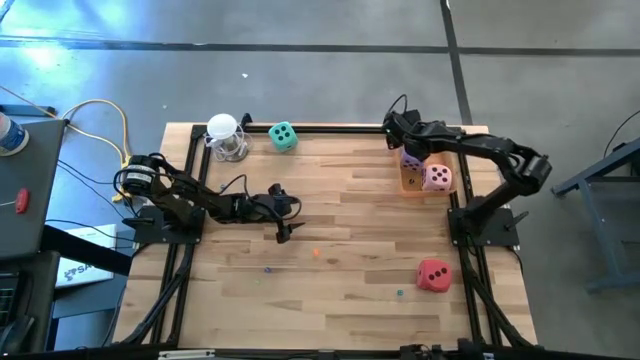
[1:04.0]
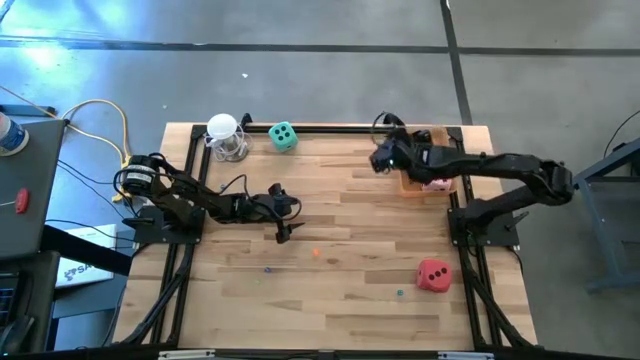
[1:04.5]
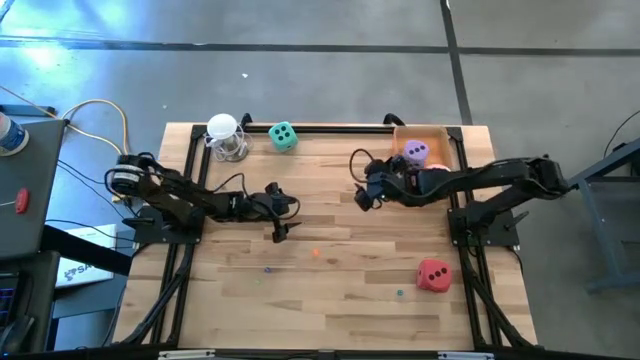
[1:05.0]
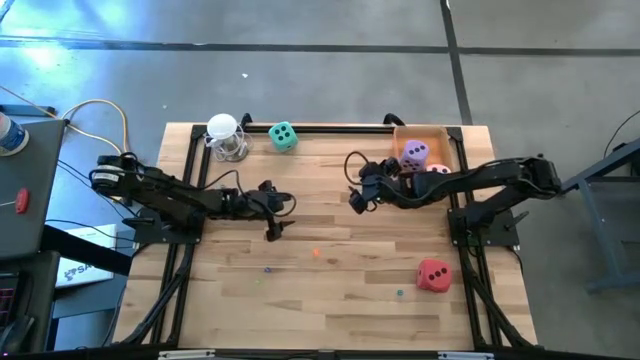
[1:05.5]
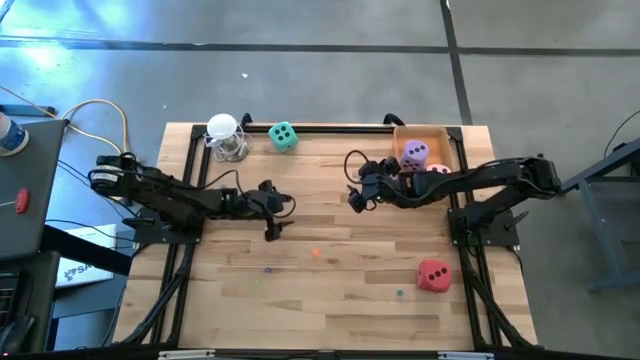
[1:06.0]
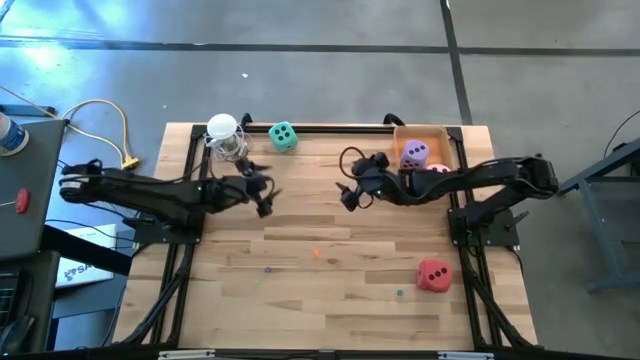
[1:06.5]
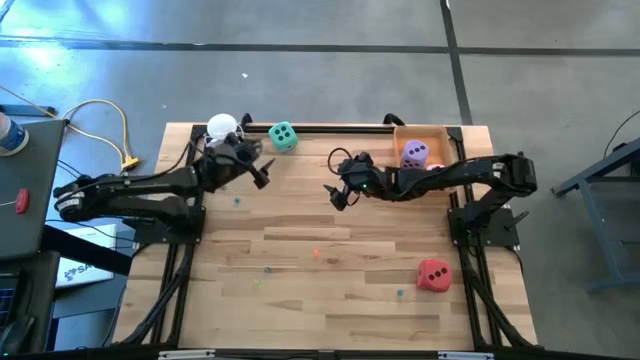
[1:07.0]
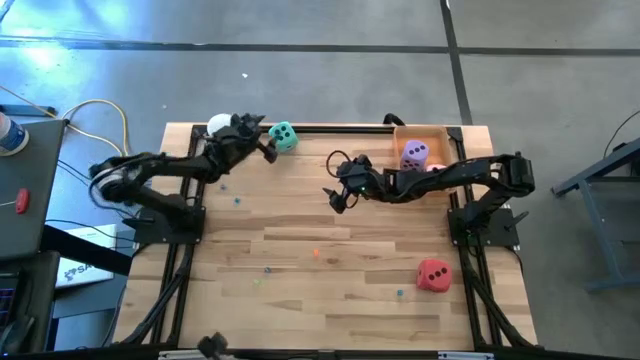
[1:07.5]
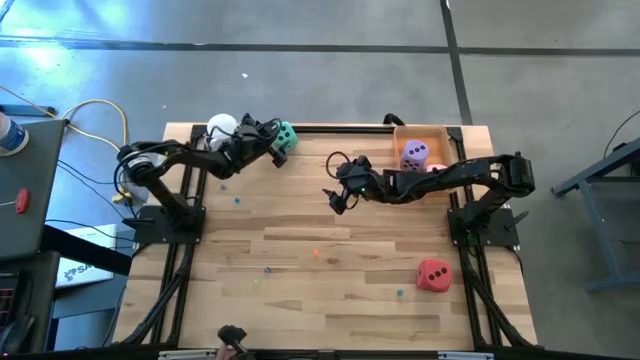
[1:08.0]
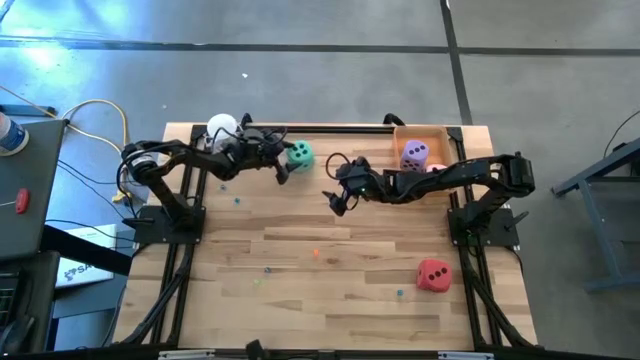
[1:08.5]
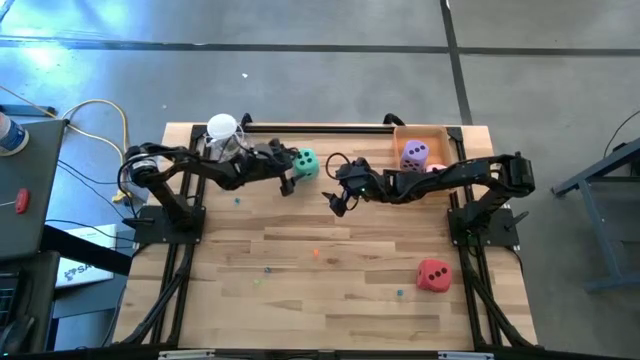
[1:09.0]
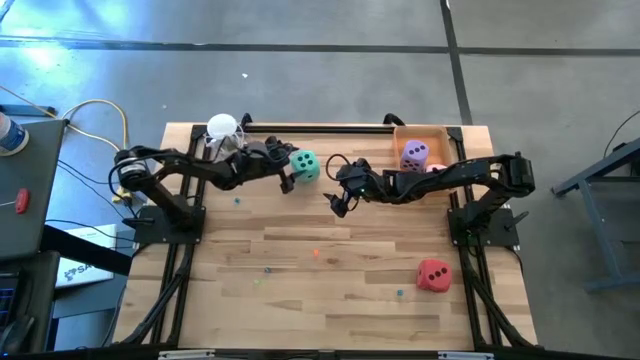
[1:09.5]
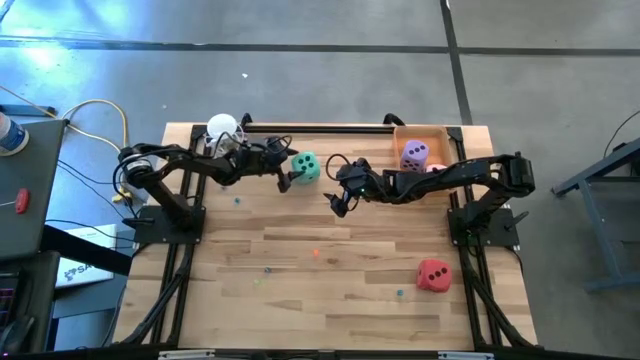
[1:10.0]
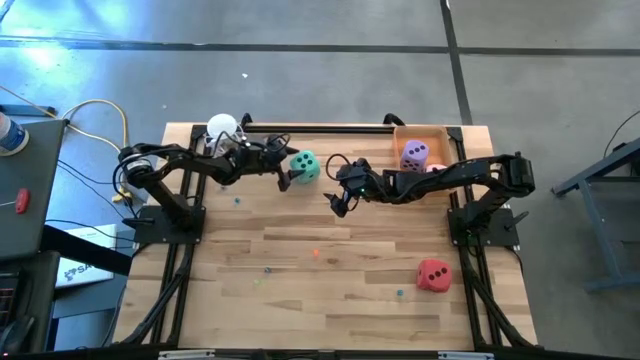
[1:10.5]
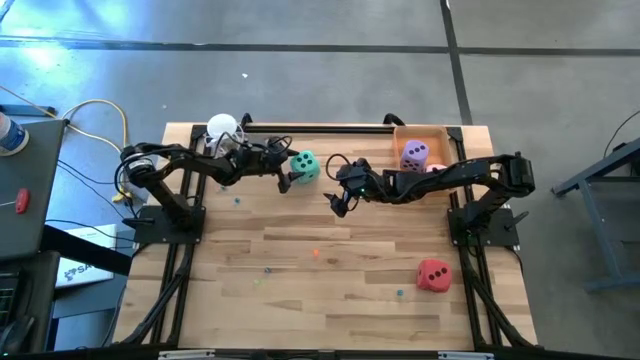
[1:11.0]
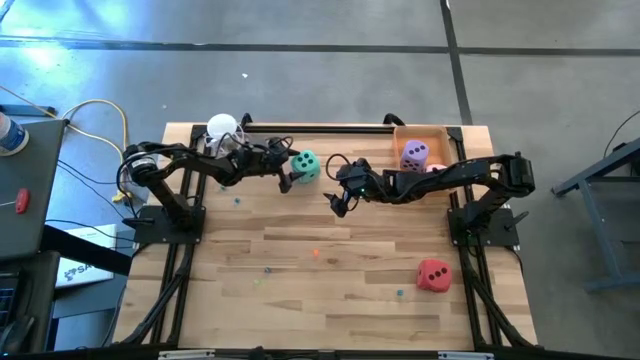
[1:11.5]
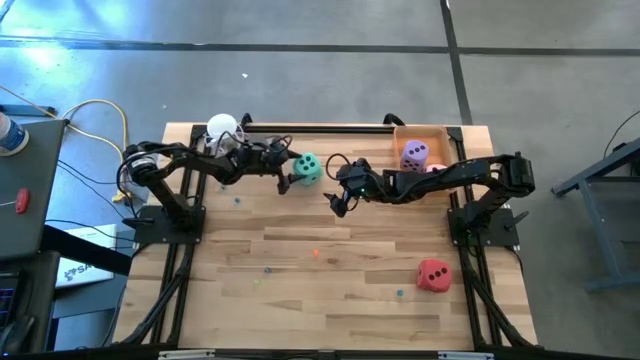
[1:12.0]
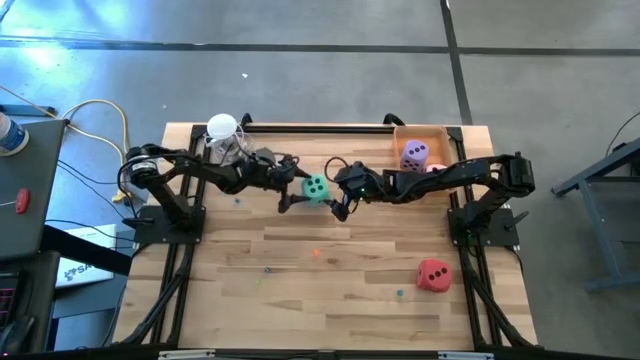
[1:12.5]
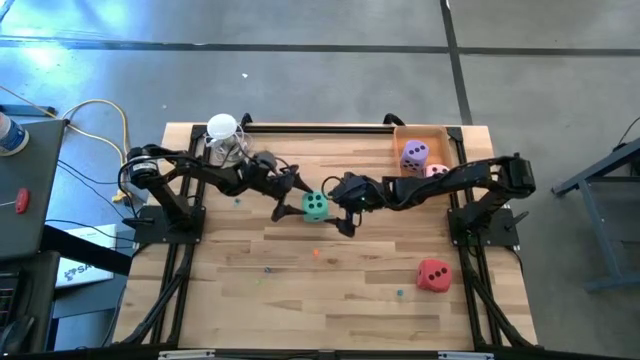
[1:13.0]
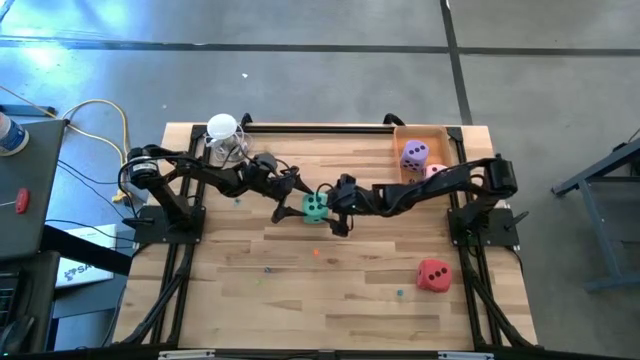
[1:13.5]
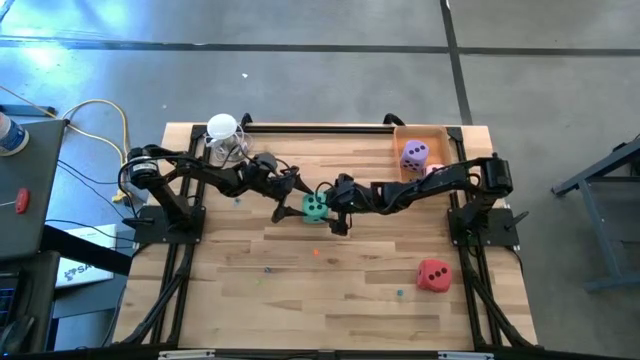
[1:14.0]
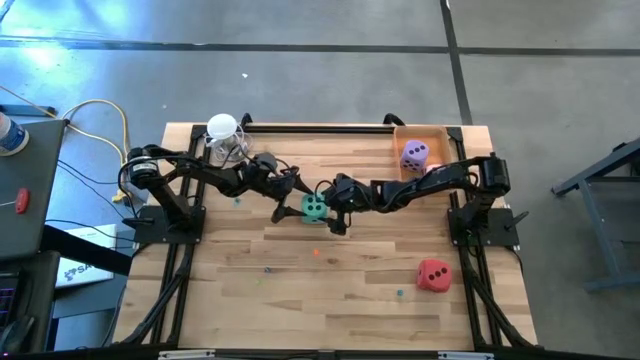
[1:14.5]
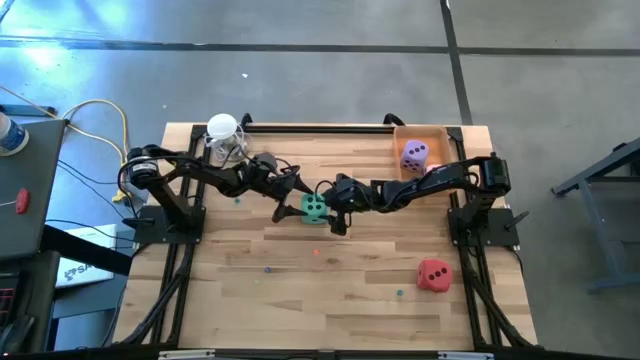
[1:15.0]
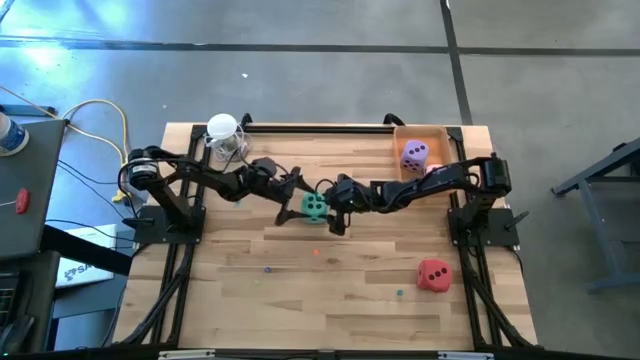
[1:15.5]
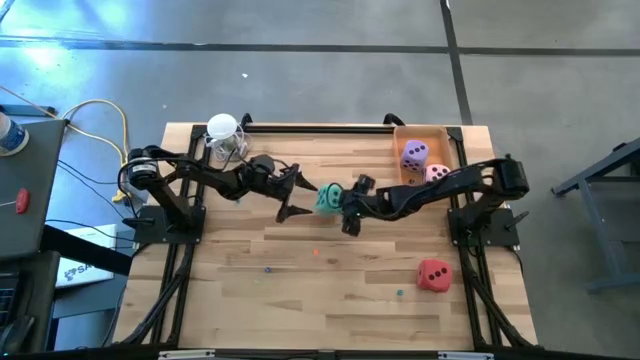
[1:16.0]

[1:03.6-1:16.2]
Task: Pick & Place Dice
Put the green large die into the orange bin

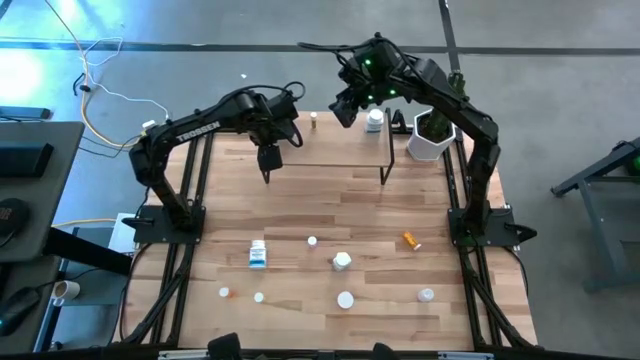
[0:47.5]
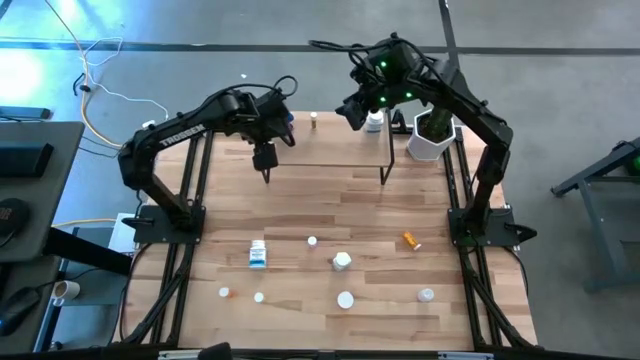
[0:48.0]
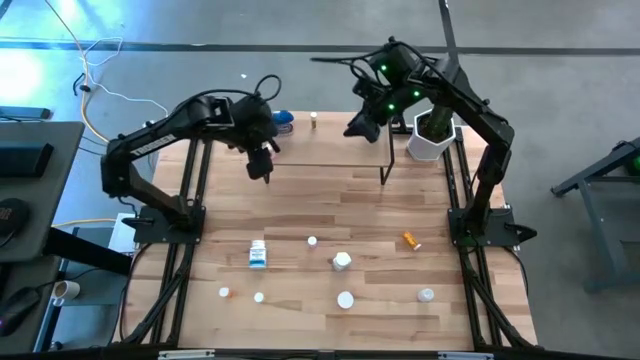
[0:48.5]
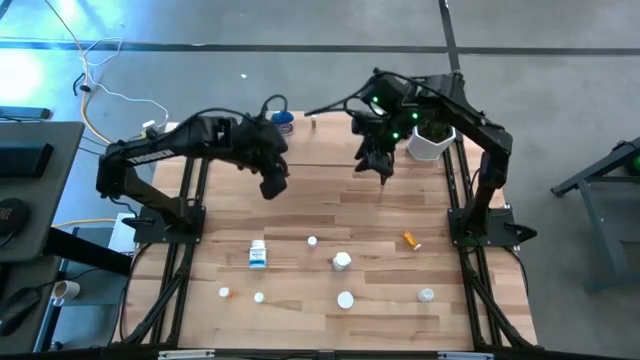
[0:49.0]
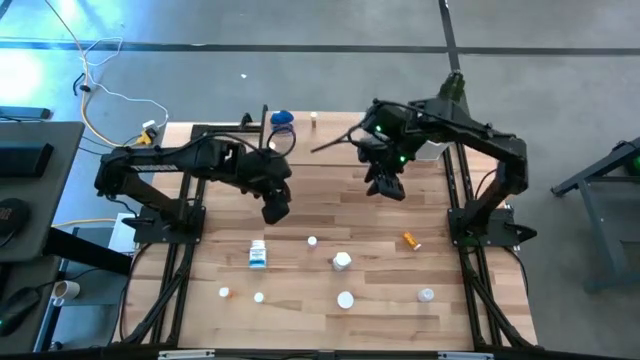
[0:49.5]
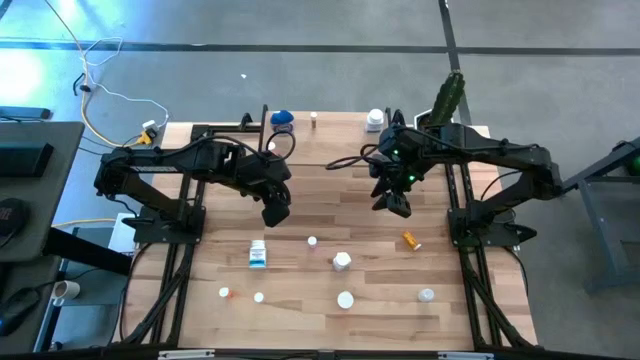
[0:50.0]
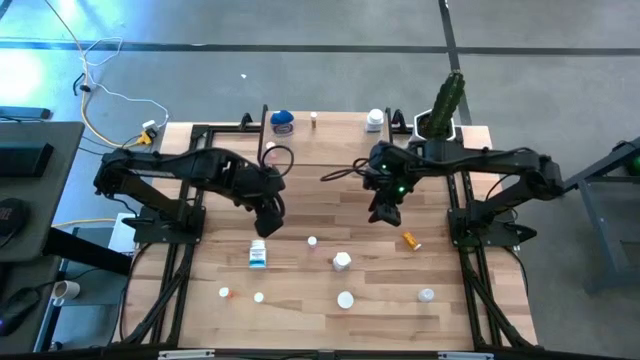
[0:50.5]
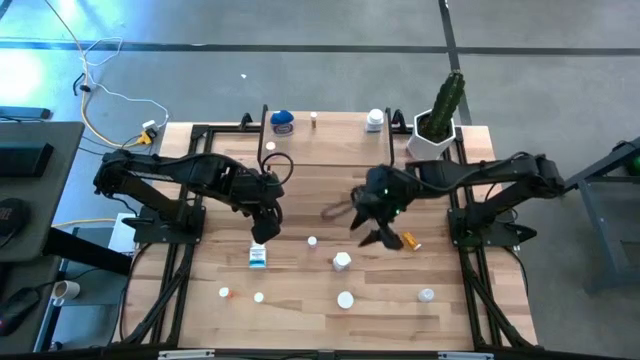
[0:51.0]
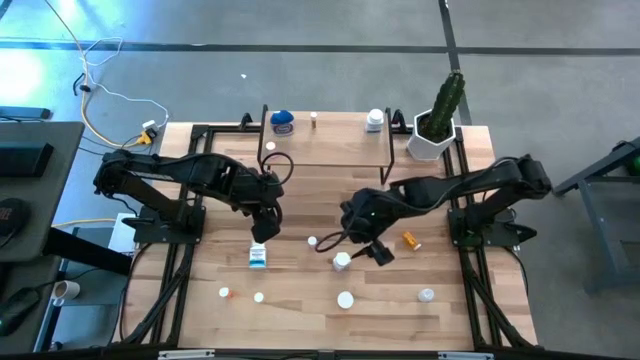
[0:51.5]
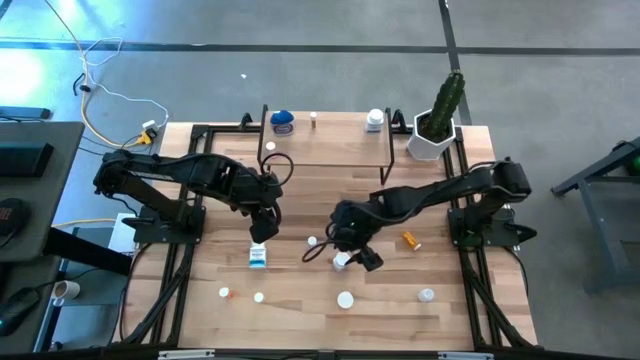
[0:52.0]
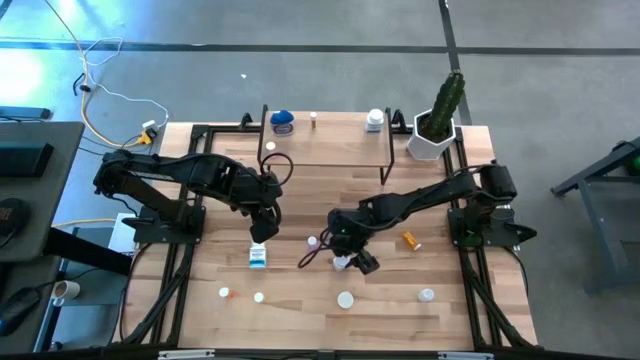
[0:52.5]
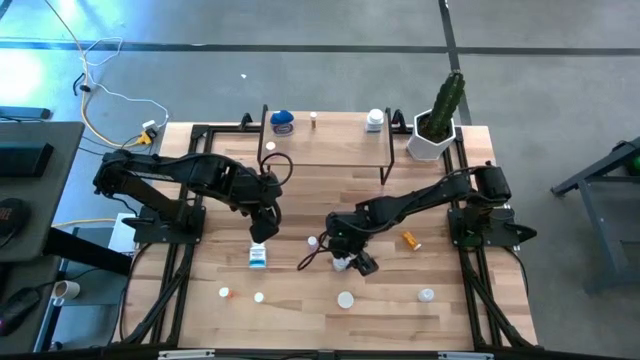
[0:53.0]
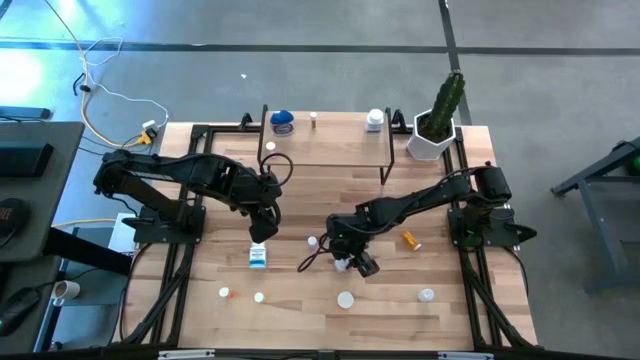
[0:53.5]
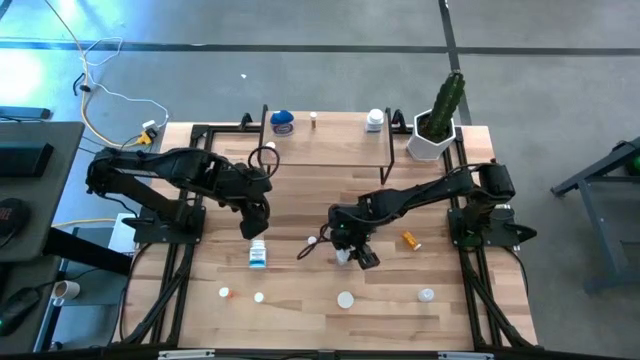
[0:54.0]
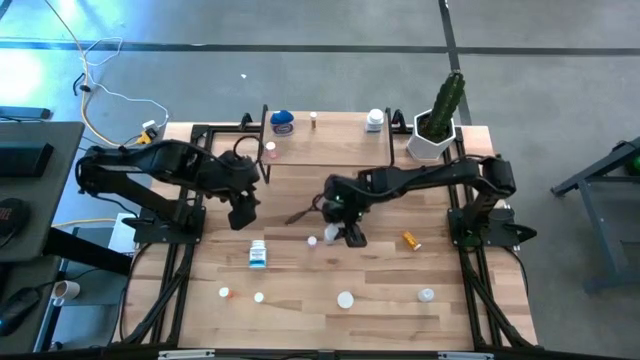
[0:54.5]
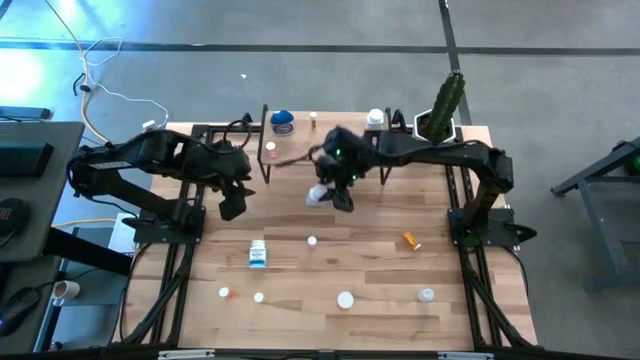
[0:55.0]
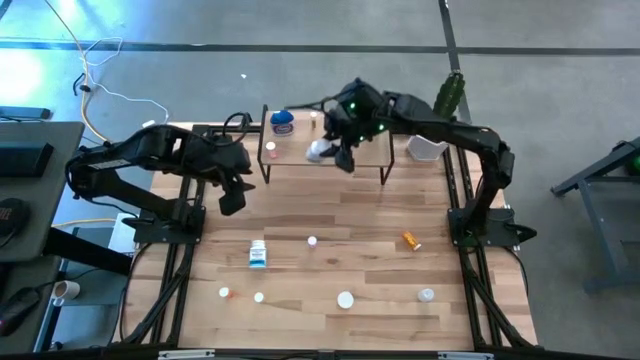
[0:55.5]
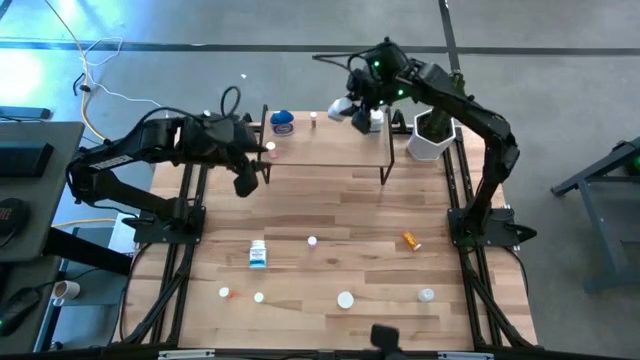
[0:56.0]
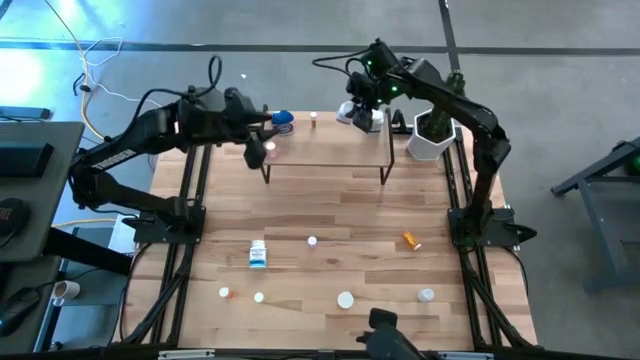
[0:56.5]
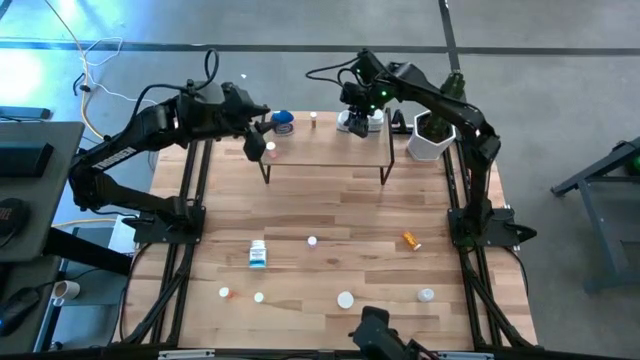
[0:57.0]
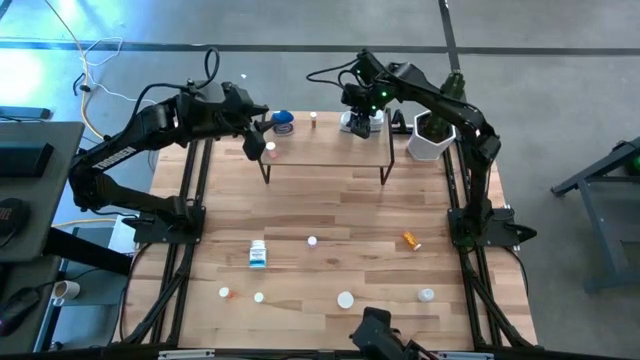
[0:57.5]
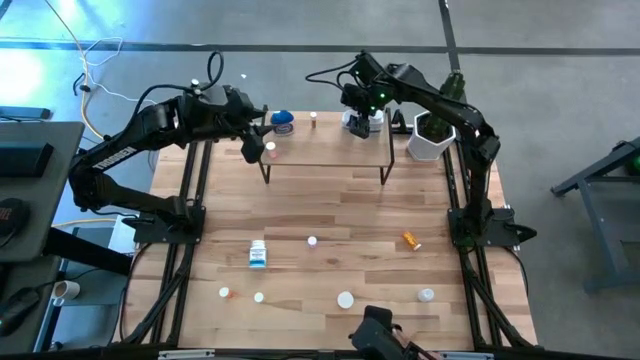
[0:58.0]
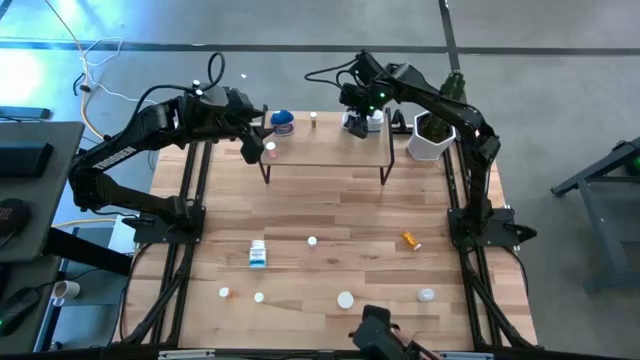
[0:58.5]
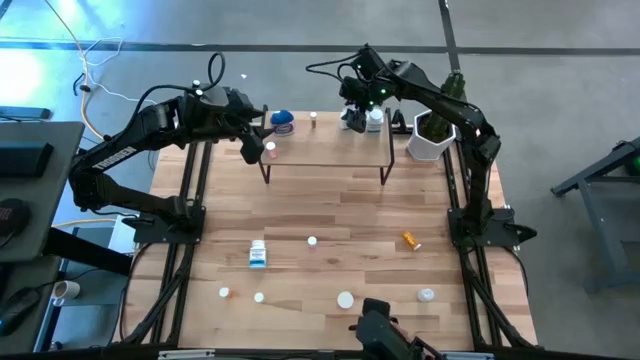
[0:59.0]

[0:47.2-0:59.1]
Task: Pick and place medicine bottles onto shelf by color
Put the white pill bottle on the shelf
